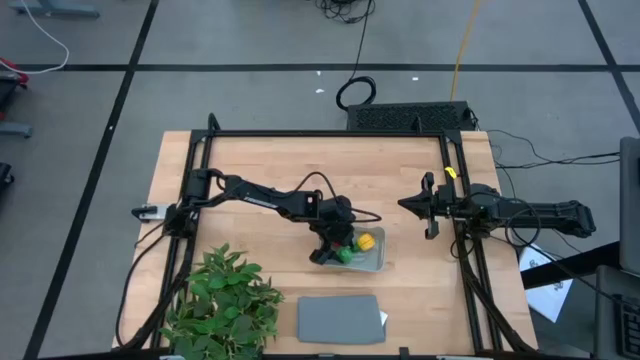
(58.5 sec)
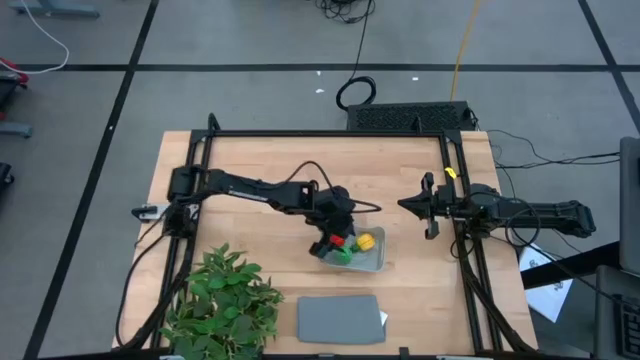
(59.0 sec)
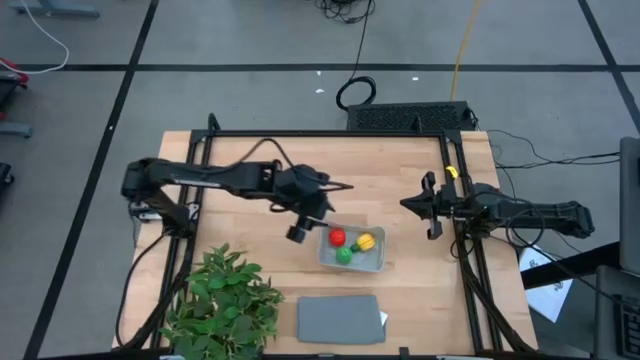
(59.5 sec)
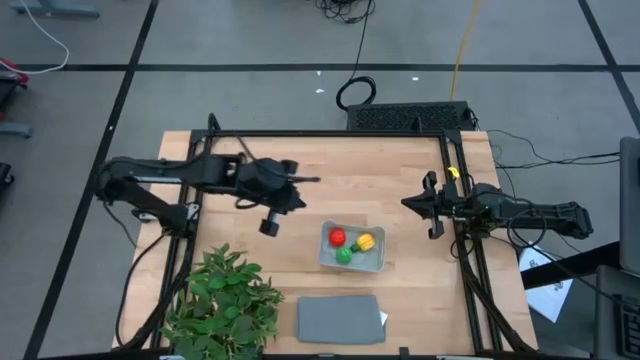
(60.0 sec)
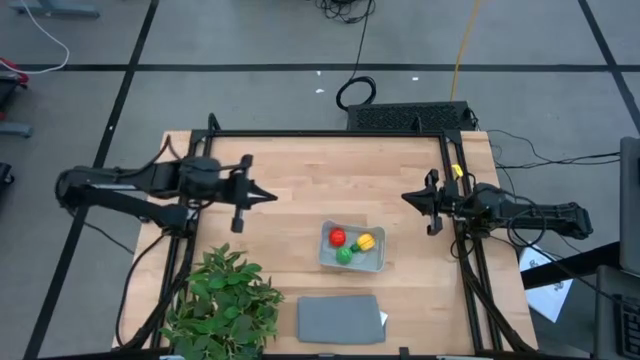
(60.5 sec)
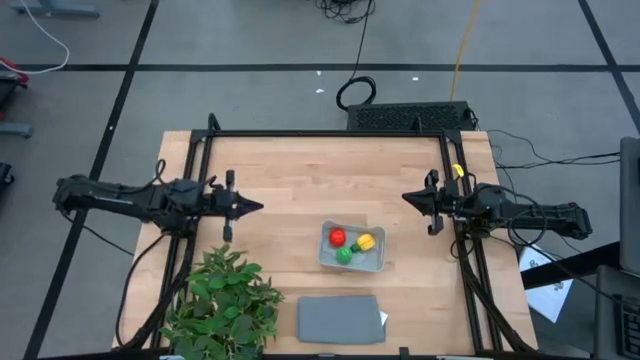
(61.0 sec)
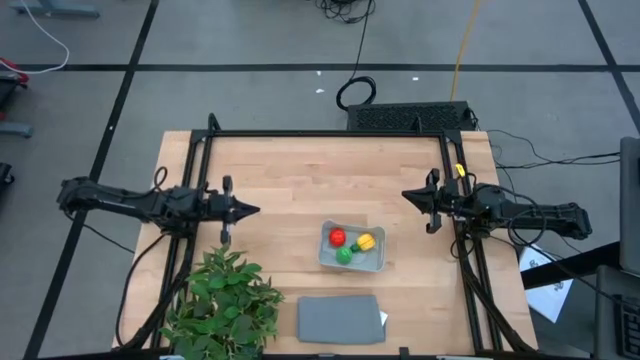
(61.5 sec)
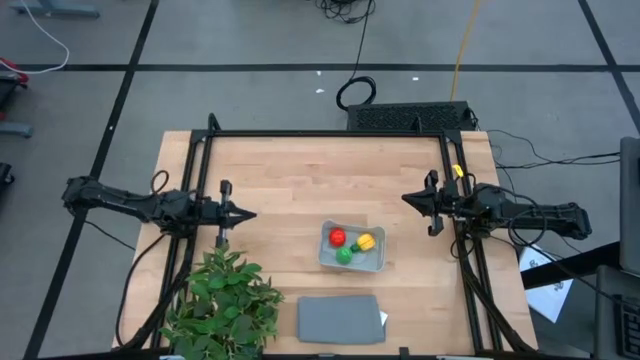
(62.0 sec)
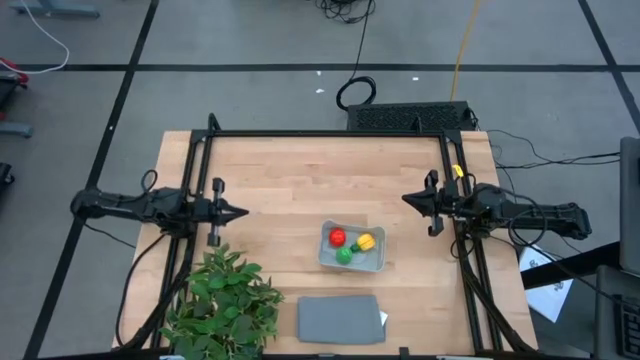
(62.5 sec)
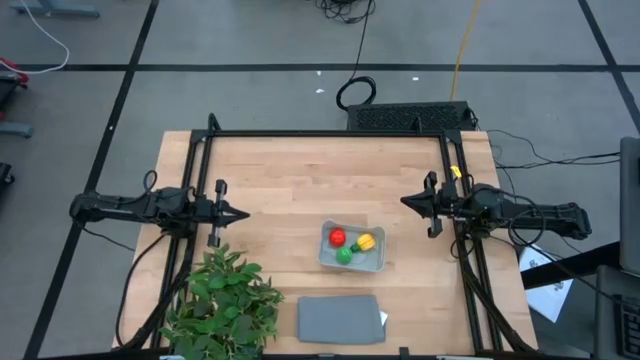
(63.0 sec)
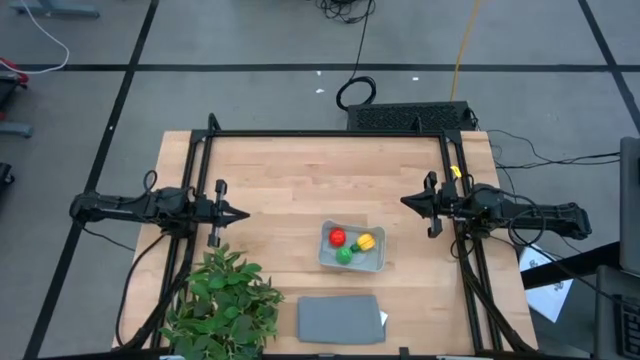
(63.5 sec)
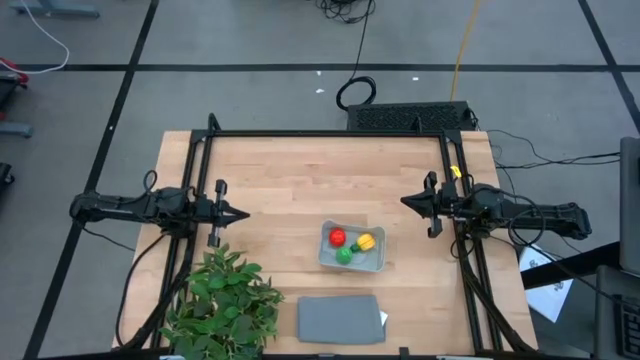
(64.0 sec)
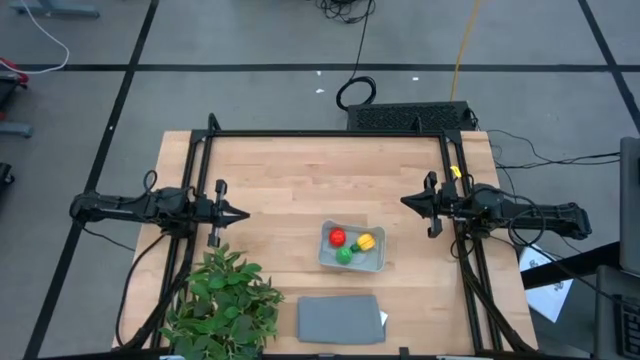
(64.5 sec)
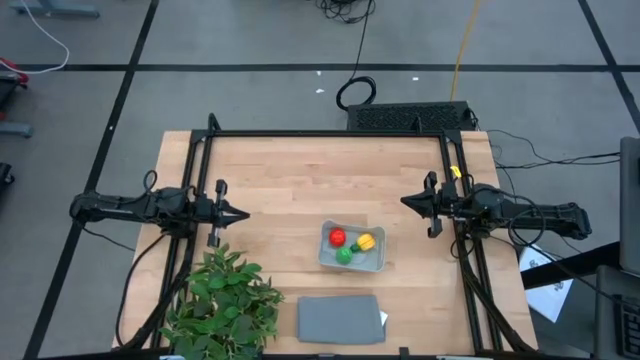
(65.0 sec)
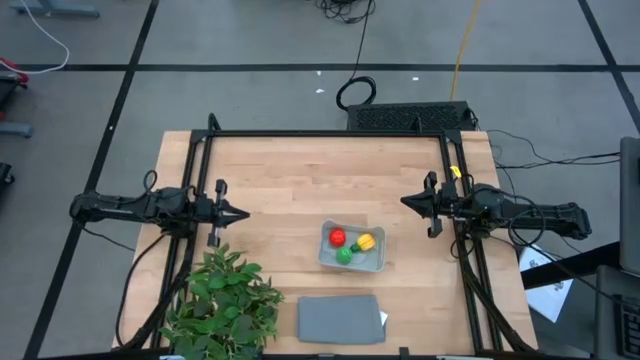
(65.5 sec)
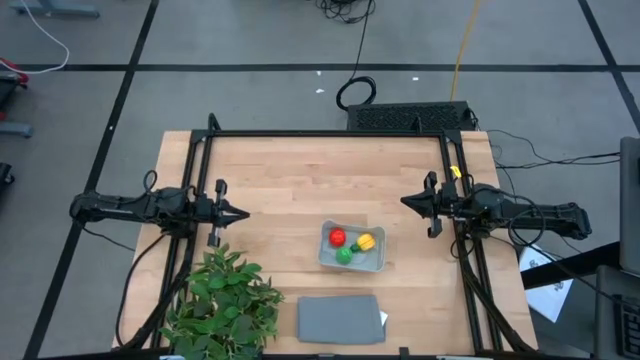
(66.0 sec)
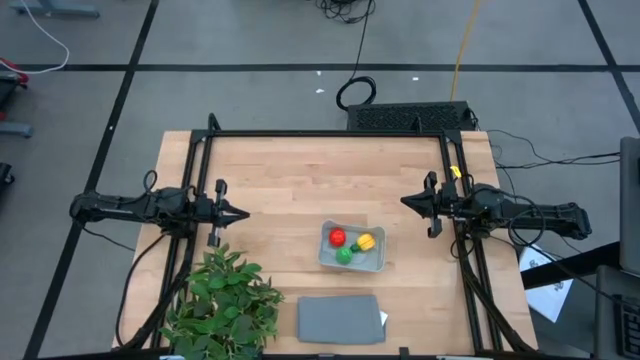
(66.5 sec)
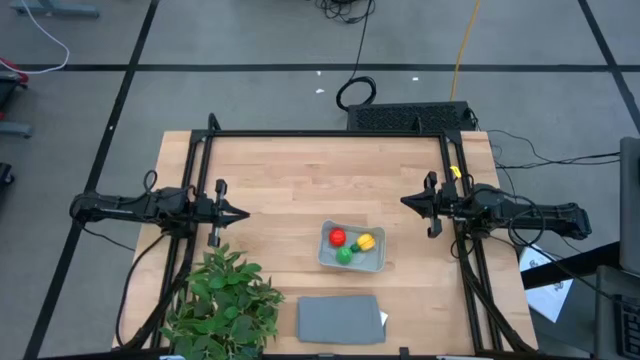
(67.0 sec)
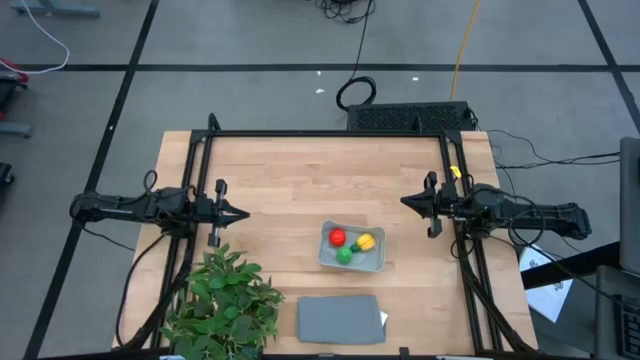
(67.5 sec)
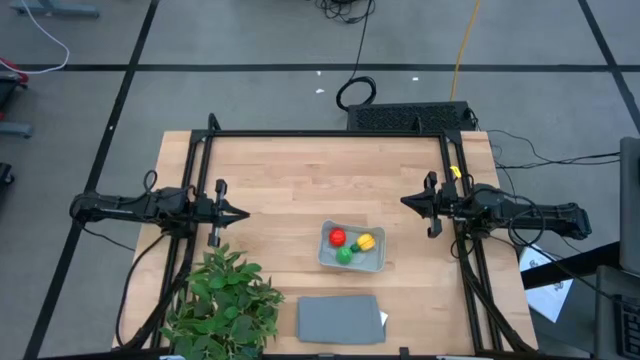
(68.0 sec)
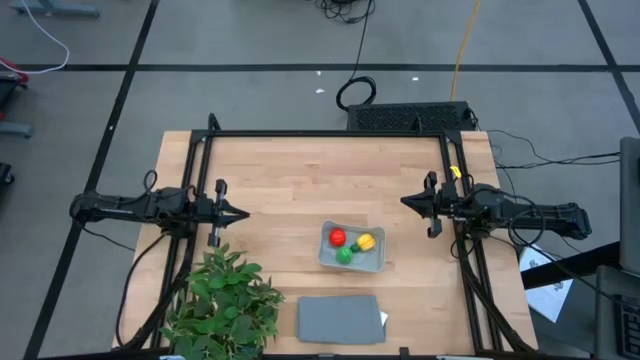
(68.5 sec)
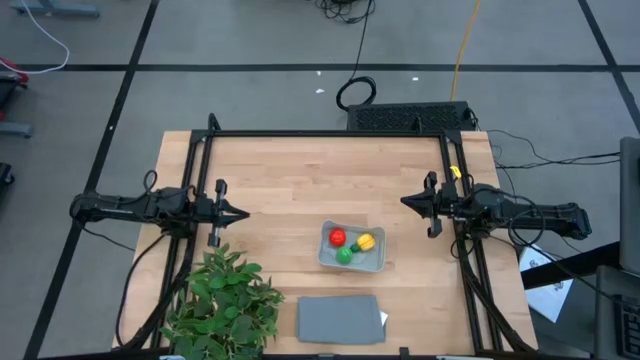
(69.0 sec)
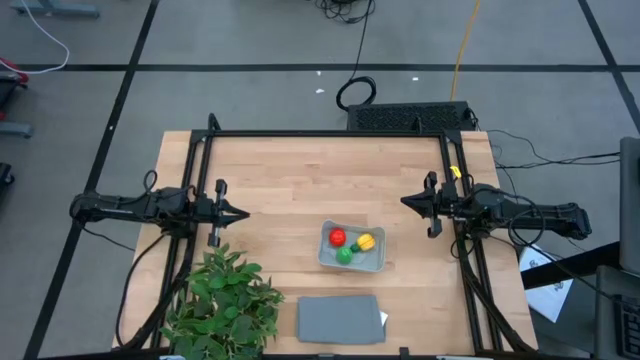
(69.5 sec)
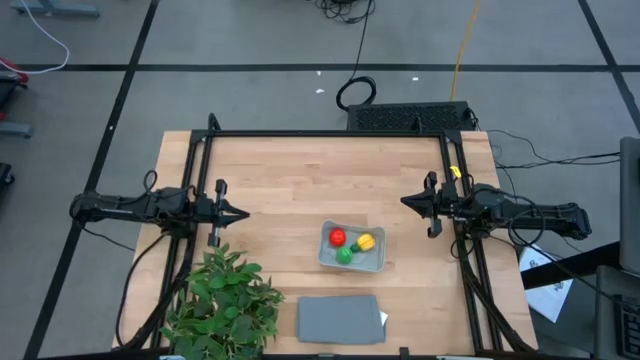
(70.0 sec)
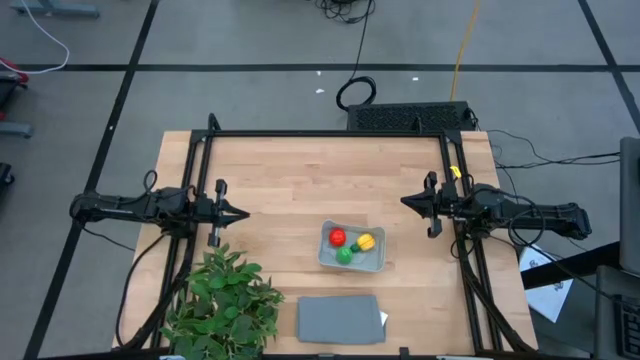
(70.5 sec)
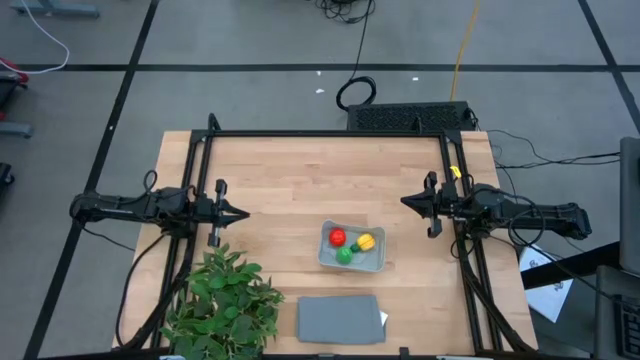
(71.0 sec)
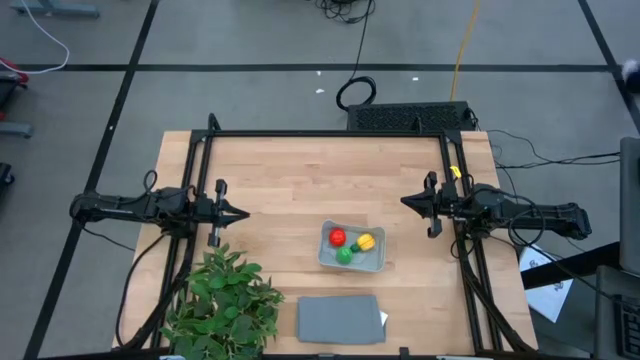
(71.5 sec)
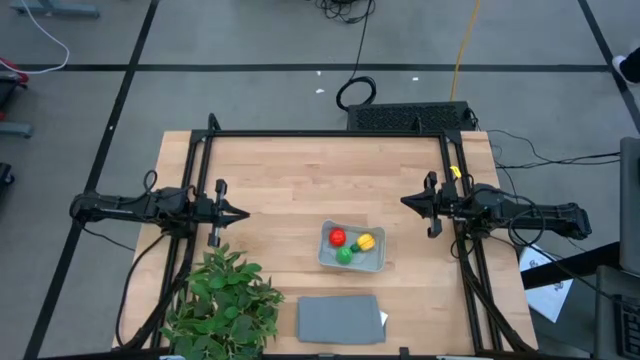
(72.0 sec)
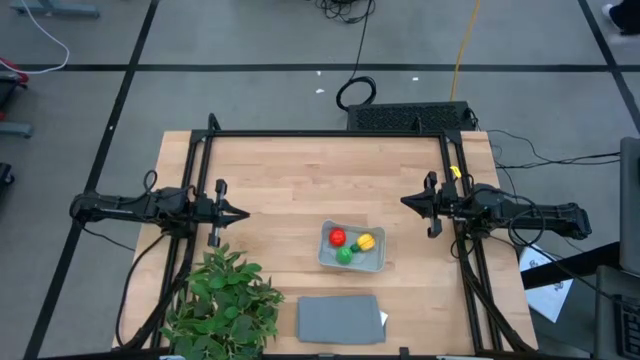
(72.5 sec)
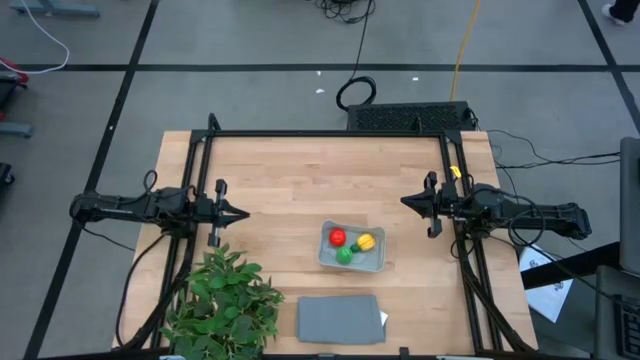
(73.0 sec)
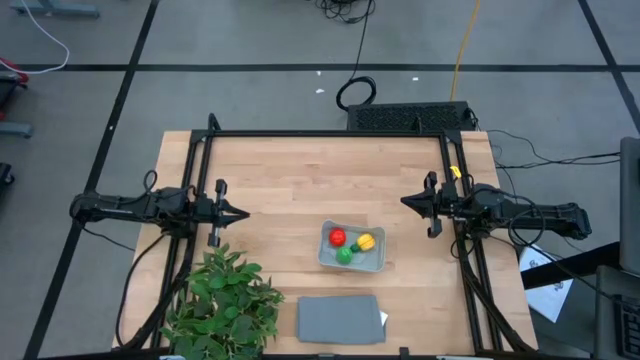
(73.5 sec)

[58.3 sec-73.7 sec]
Task: Pick and placing Produce into tupperware
Return to Home Position
